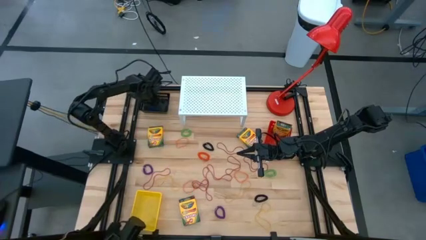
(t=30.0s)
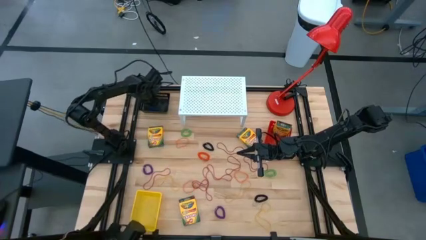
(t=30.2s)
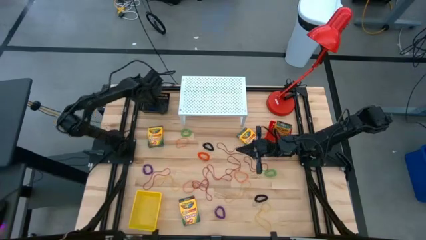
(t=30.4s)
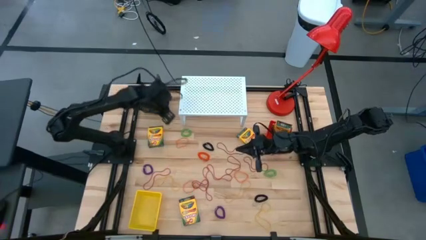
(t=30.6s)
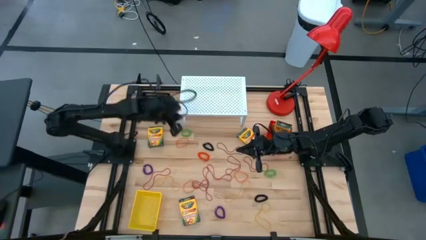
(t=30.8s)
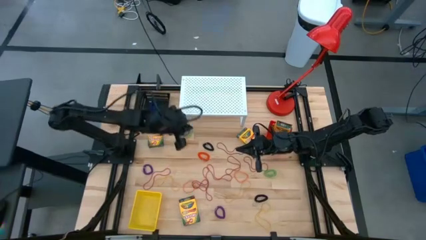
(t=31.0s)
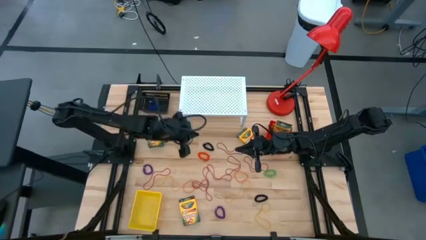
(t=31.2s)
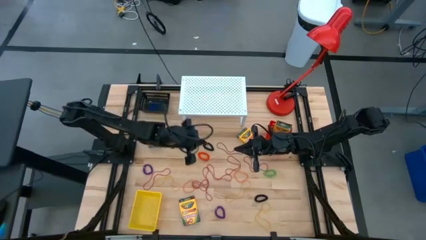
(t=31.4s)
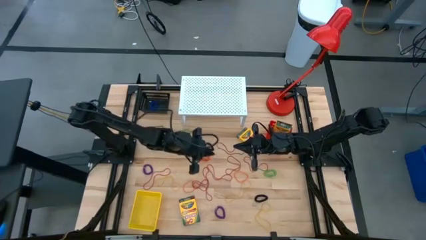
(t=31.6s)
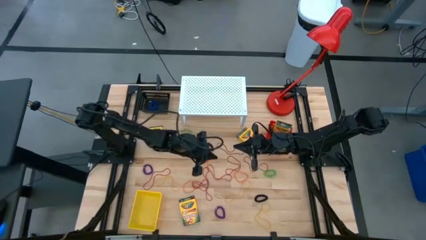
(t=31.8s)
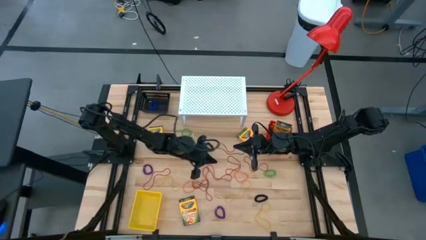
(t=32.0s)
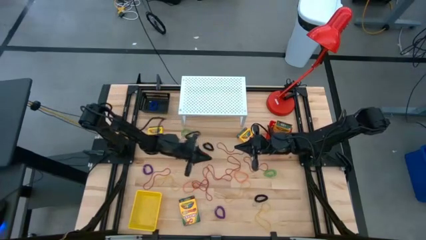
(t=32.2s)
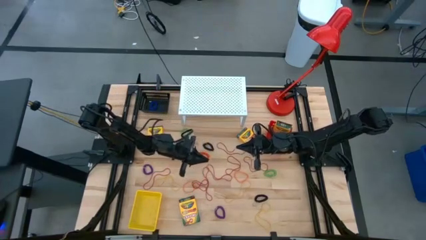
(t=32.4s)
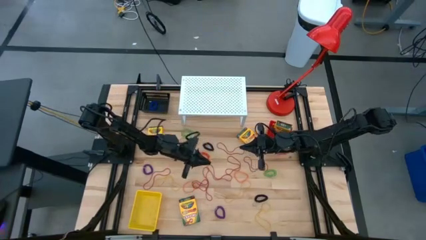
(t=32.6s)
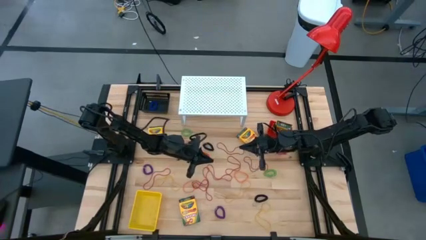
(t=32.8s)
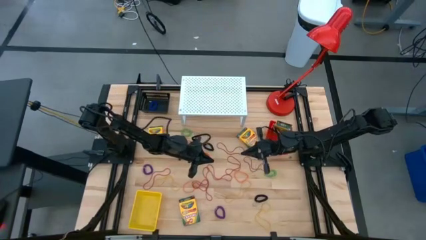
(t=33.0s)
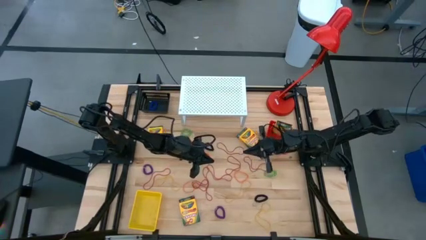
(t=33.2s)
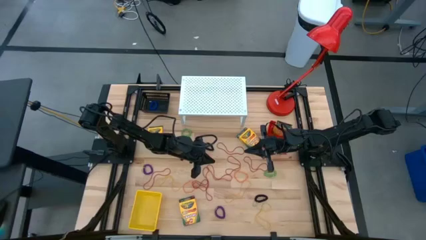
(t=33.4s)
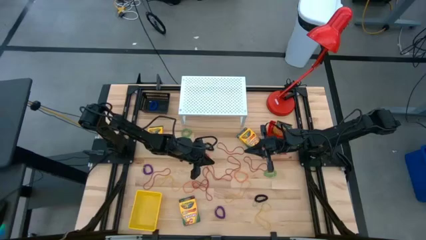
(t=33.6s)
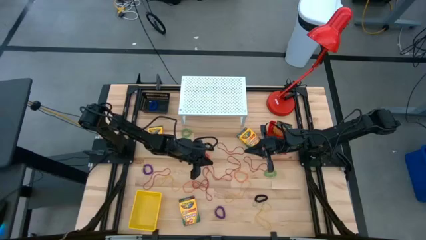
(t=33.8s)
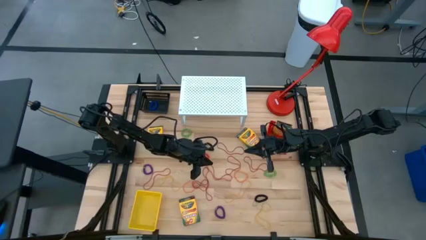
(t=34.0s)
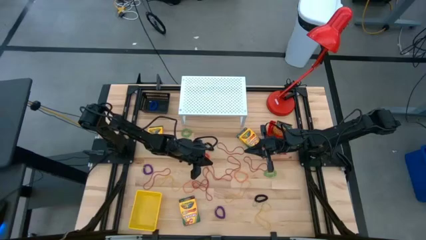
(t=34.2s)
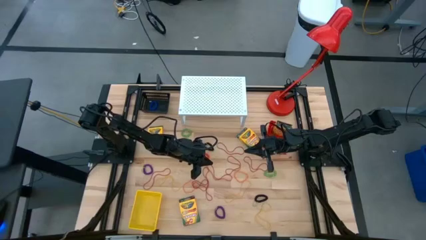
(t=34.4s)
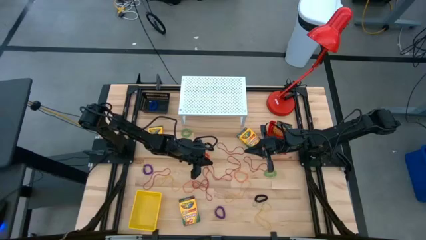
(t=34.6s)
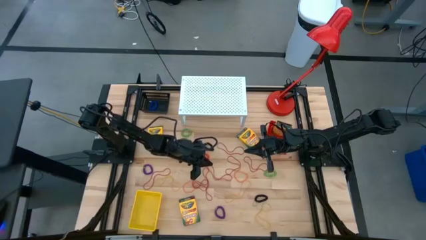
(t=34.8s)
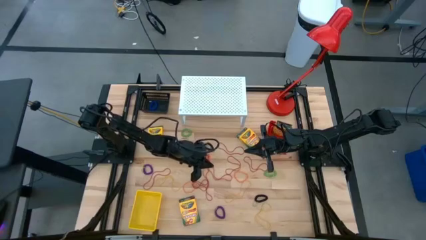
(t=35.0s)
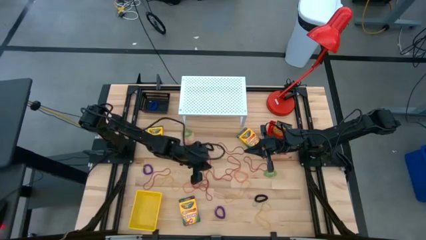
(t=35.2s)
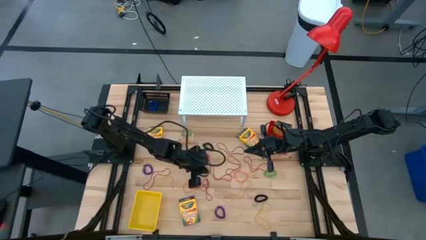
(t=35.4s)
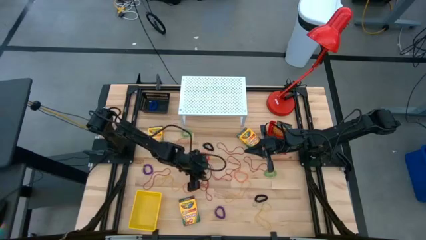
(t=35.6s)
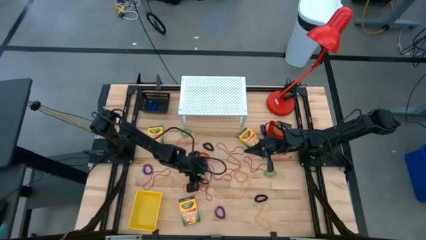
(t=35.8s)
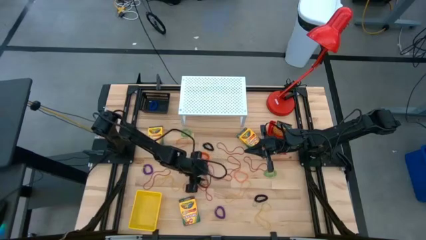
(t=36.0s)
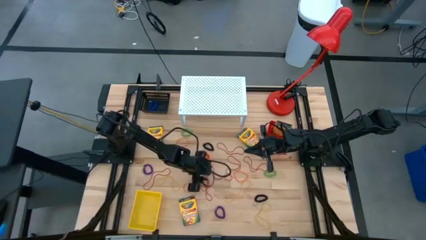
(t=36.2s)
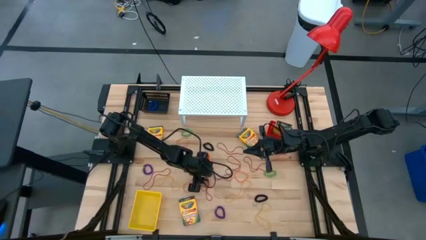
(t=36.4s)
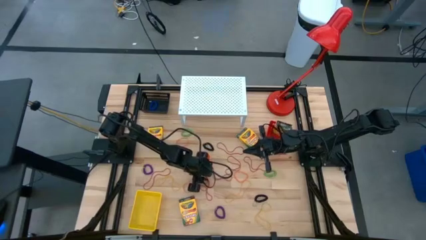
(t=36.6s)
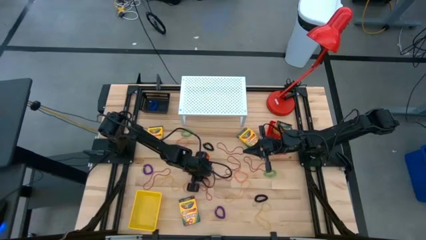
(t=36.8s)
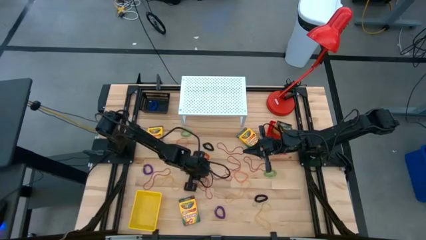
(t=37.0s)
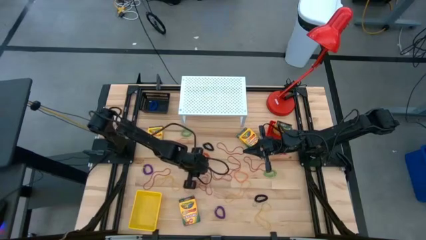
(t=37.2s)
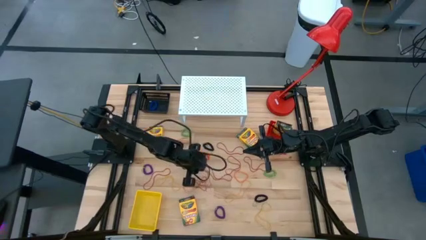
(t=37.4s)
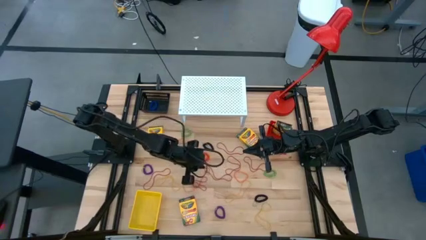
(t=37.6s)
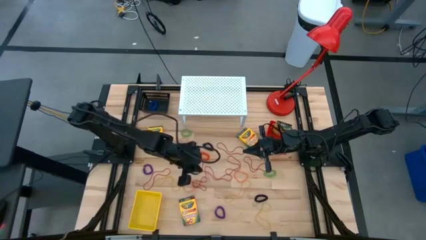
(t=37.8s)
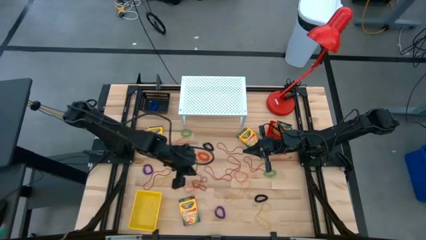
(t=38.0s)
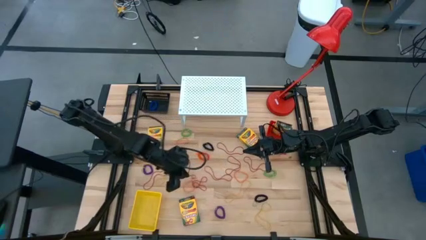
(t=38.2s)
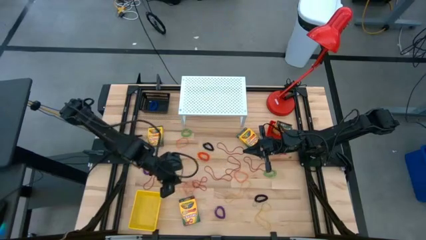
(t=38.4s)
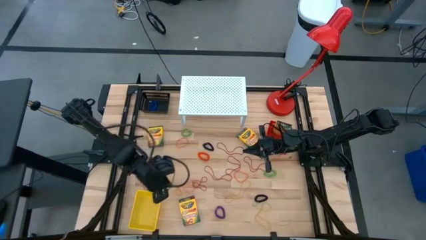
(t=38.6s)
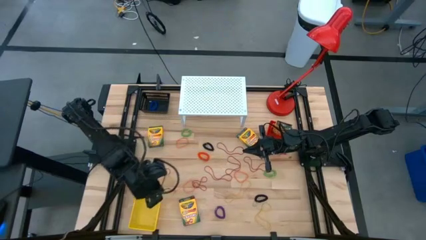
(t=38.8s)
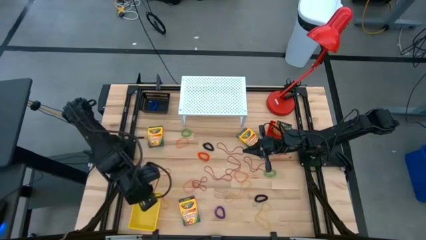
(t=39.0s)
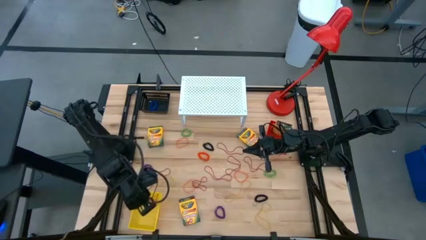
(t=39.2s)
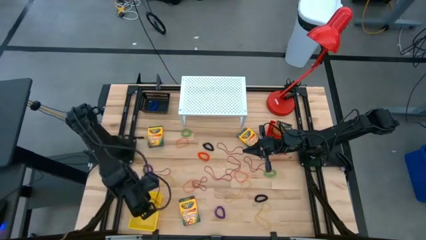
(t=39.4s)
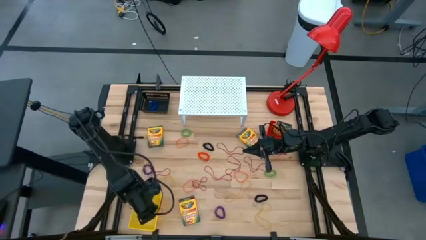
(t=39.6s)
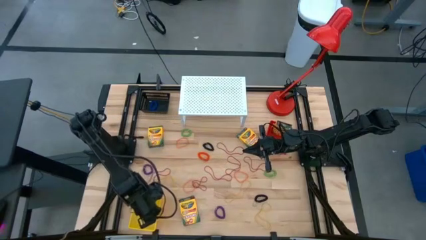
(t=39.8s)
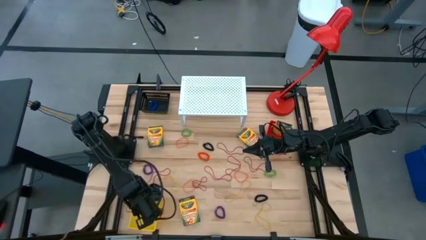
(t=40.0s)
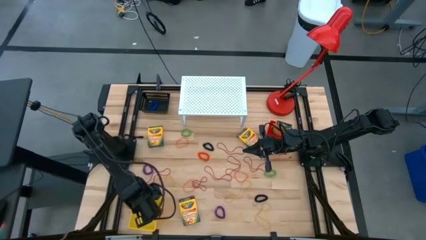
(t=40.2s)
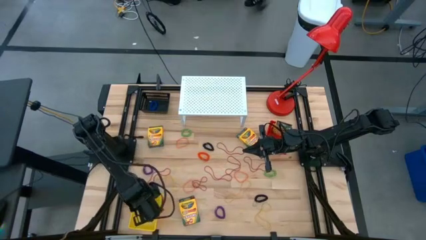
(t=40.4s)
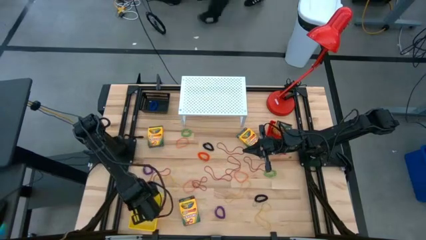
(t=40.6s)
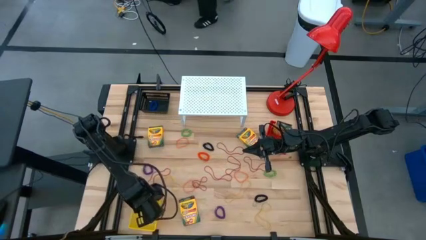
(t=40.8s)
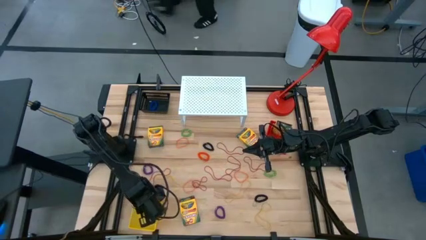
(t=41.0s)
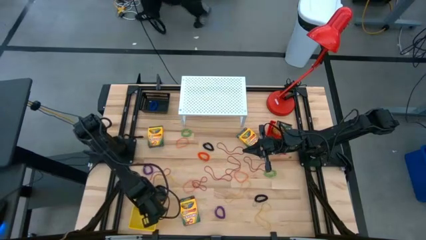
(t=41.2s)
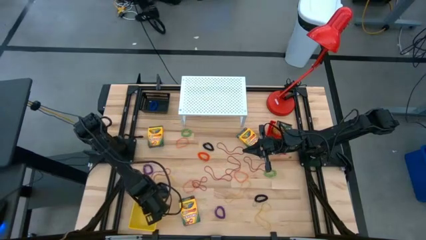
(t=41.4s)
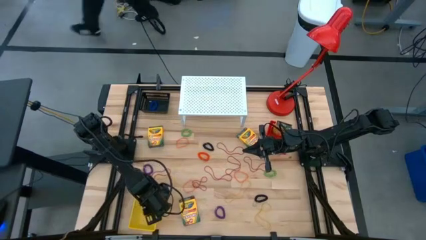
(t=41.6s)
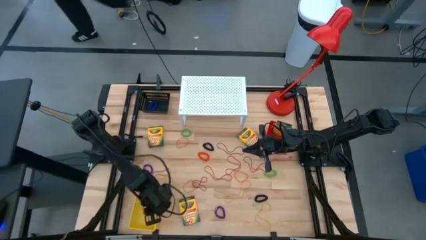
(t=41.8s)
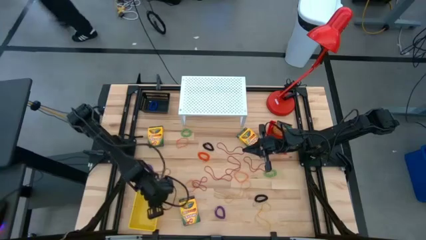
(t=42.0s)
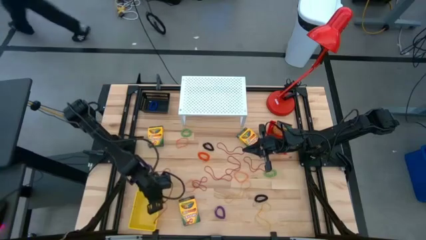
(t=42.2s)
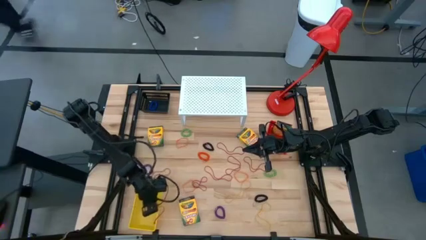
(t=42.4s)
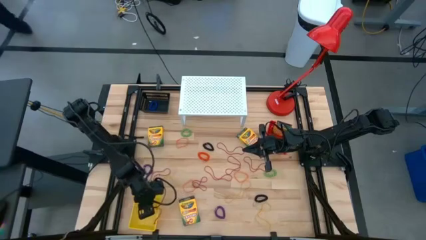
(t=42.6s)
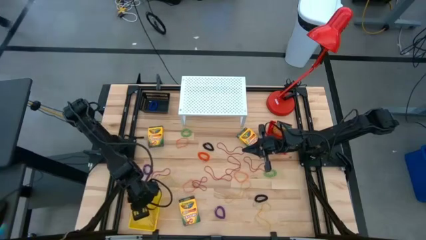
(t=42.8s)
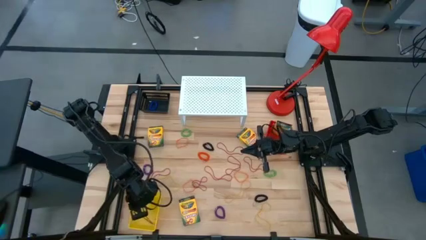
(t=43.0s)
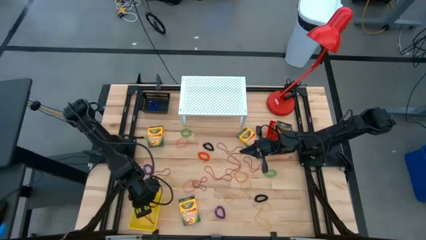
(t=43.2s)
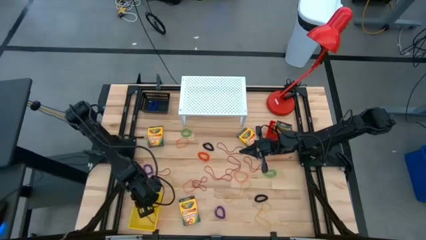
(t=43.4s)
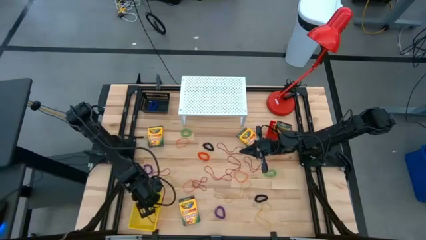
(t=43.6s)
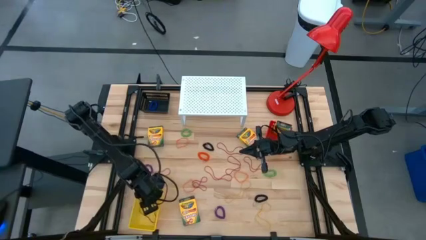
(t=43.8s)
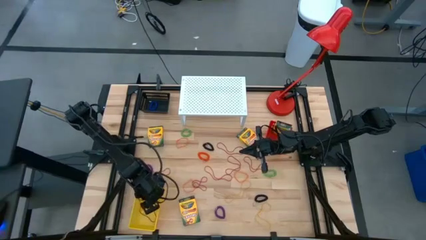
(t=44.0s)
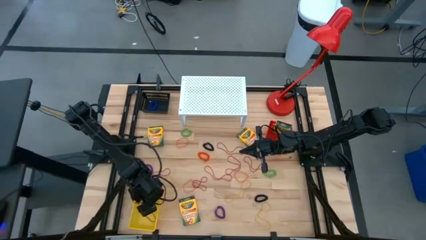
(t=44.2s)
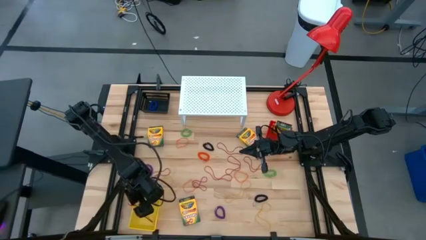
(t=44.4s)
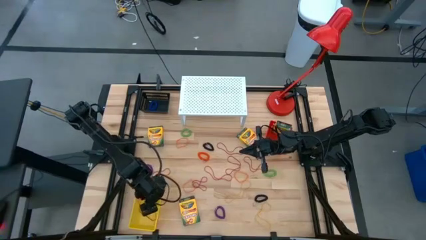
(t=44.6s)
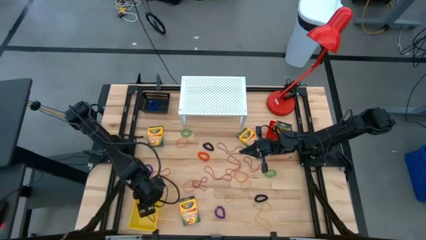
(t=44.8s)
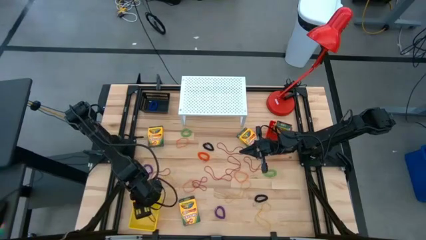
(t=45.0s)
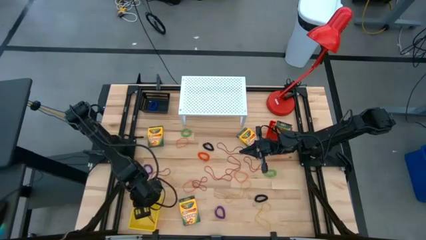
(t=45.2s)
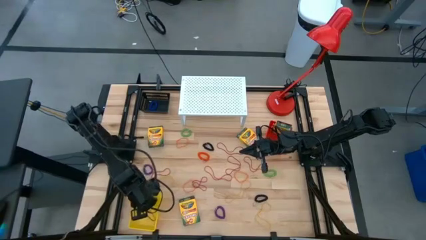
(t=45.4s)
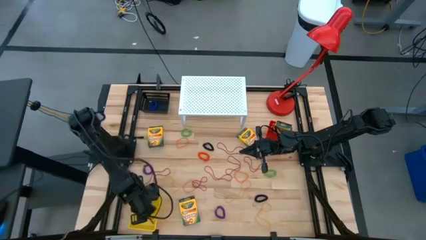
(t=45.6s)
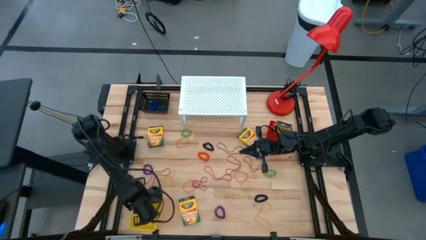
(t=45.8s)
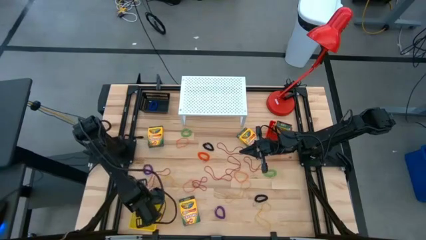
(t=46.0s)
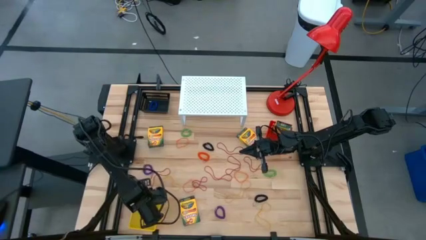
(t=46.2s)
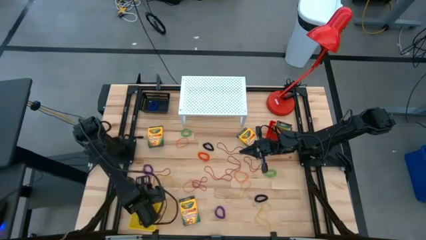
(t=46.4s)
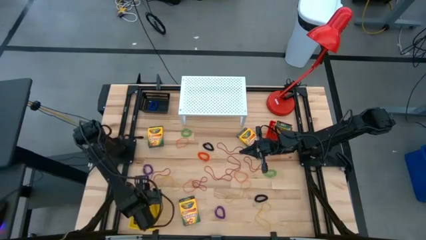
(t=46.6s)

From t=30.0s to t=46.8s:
Task: Pick & Place Office Desk Supplies
Put the red rubber band into the yellow bin
